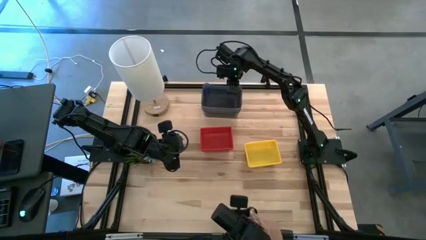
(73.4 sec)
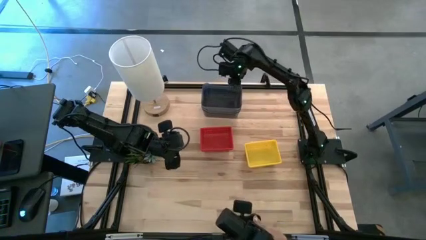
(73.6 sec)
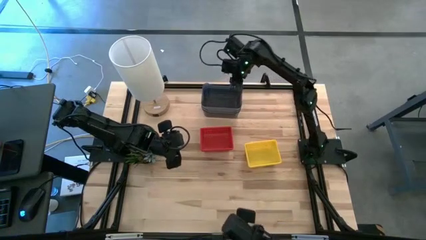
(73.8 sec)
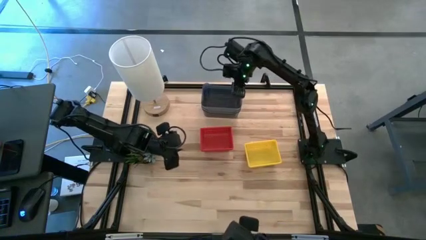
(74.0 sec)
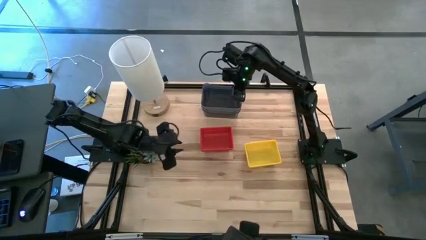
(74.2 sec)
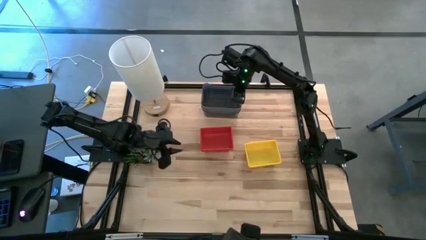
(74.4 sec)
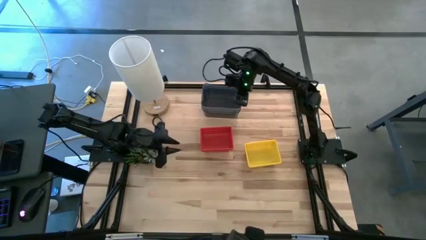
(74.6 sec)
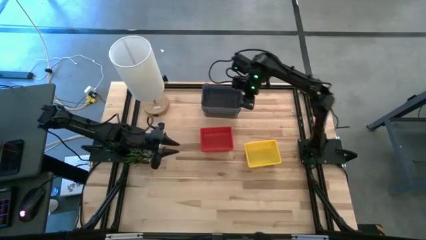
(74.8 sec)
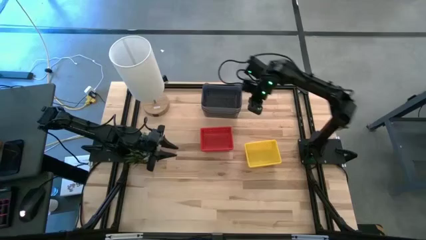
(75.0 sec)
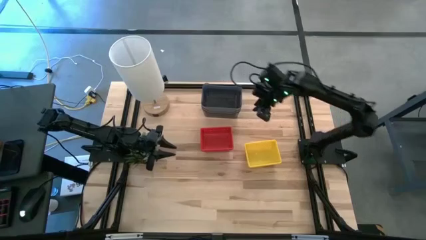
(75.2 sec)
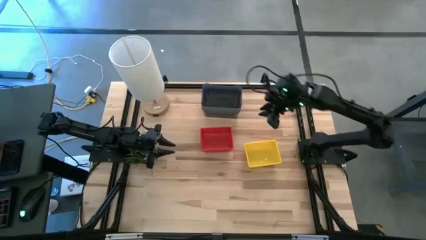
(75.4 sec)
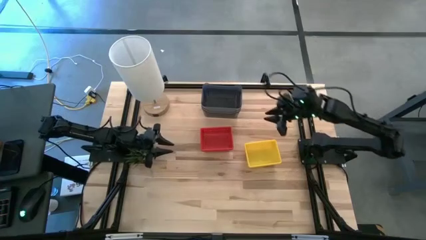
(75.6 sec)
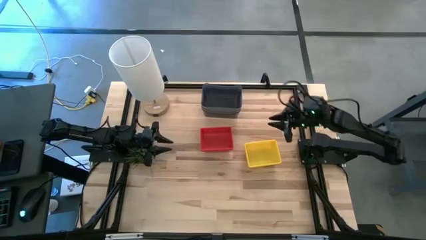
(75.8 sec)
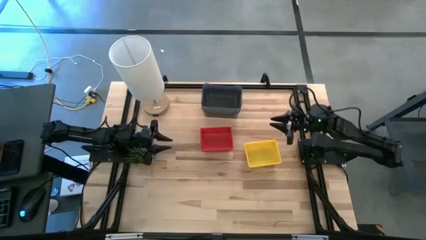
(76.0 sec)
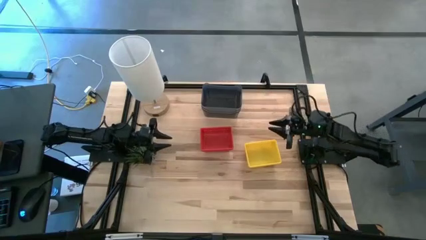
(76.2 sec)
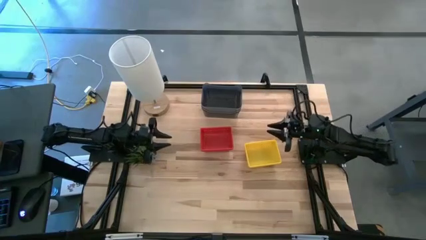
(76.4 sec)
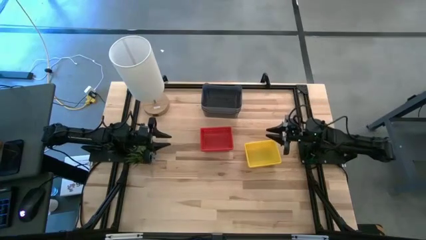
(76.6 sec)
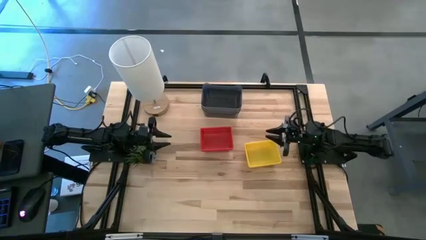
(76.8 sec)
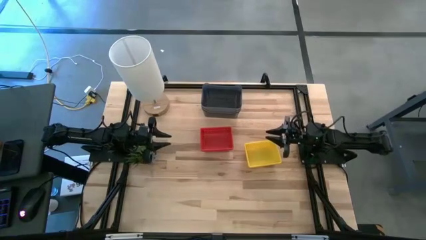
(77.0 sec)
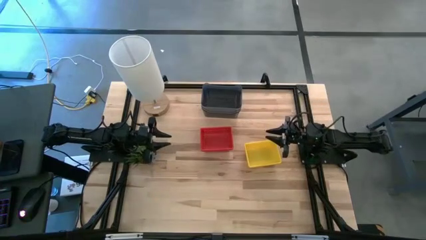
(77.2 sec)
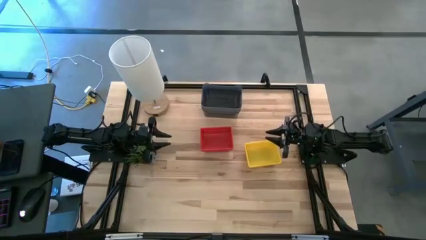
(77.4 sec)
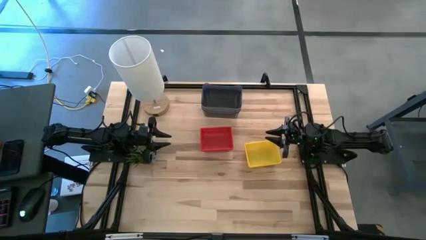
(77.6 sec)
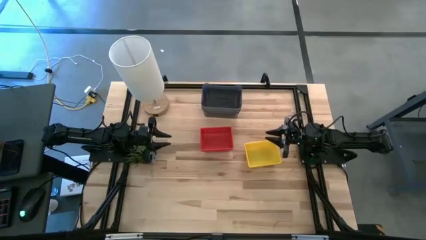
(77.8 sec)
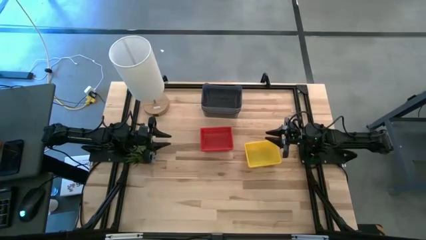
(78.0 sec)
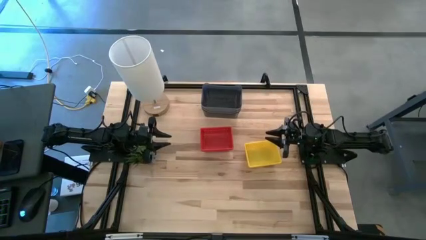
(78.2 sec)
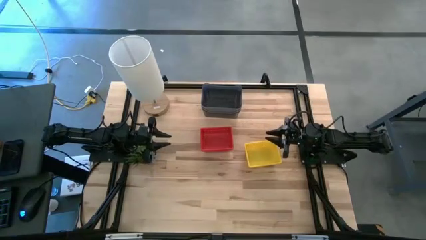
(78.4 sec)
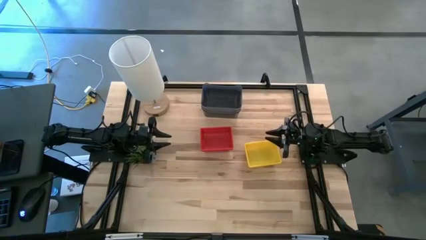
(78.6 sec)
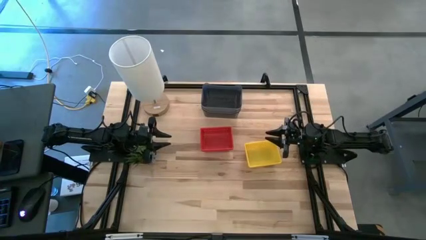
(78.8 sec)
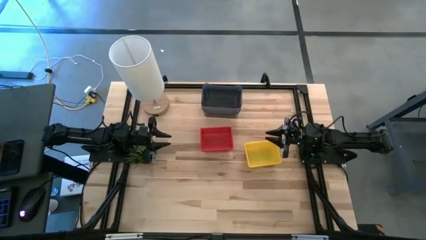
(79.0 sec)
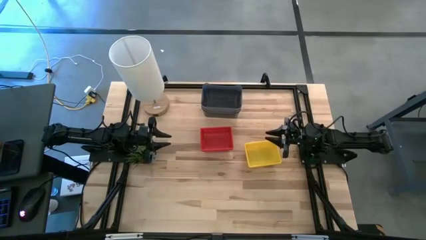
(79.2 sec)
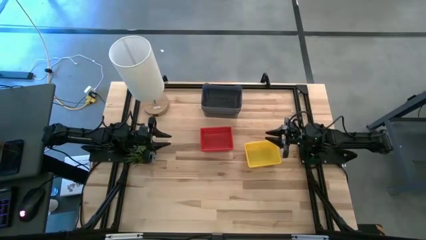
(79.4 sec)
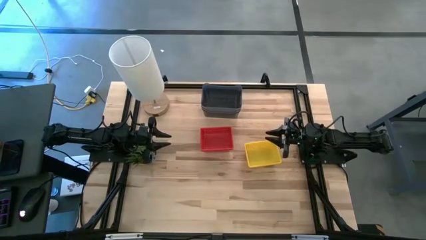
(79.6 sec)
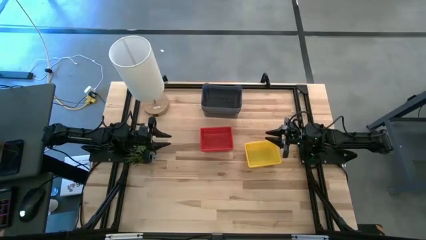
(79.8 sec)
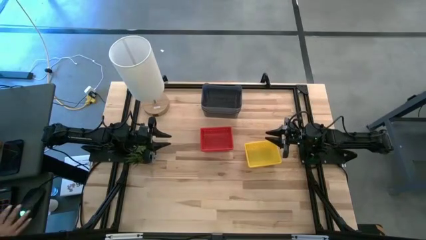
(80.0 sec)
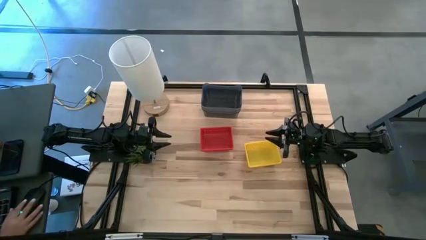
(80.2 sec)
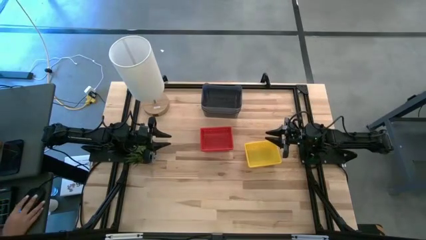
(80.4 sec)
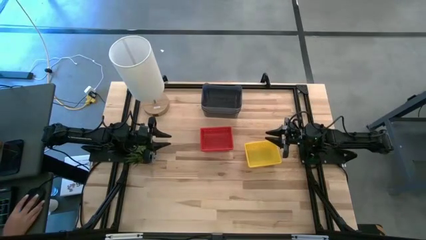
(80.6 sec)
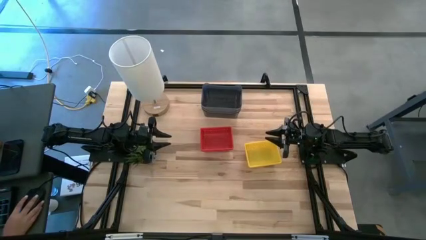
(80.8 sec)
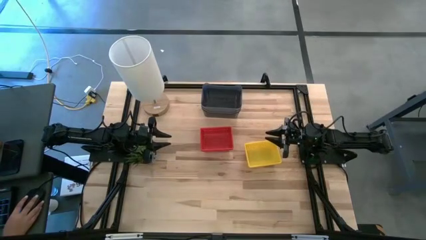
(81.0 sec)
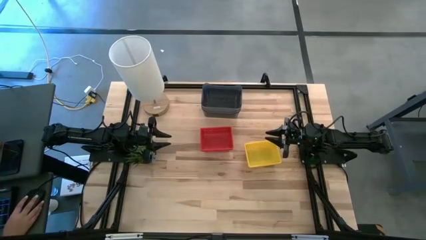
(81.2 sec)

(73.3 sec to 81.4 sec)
Return to Home Position
